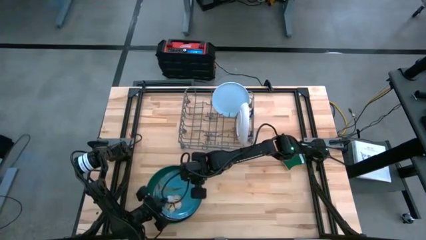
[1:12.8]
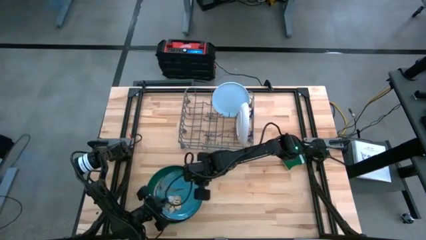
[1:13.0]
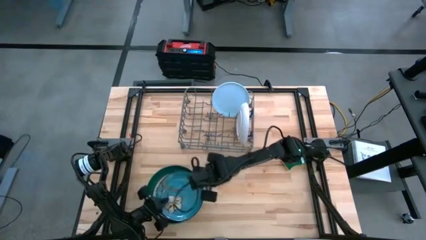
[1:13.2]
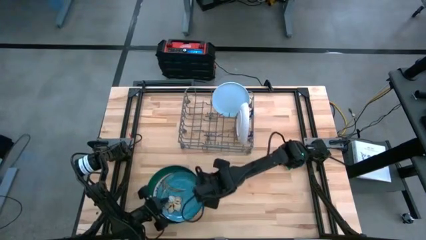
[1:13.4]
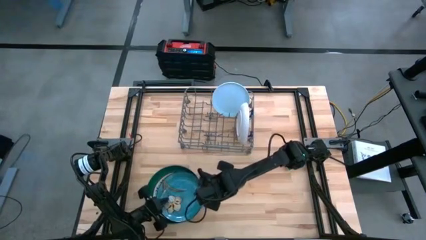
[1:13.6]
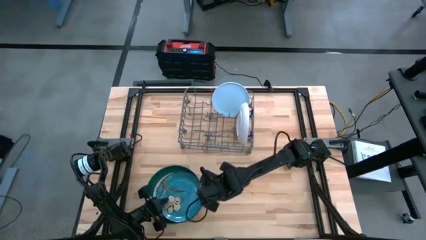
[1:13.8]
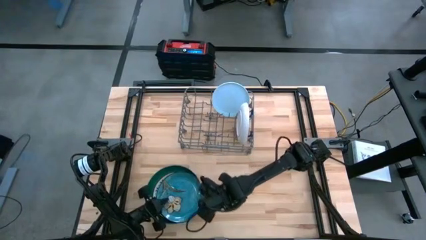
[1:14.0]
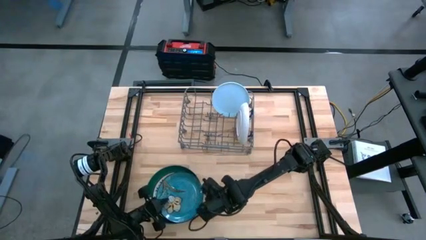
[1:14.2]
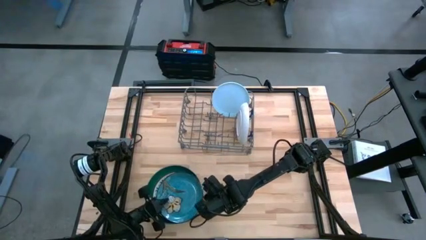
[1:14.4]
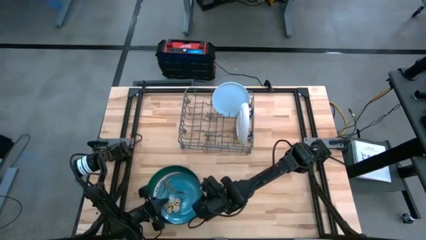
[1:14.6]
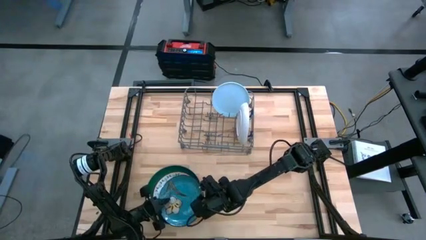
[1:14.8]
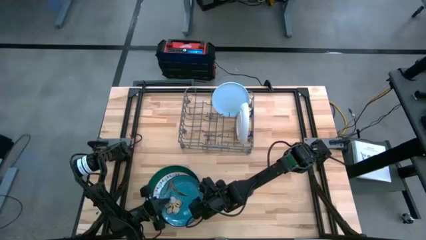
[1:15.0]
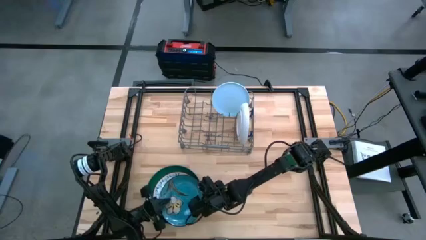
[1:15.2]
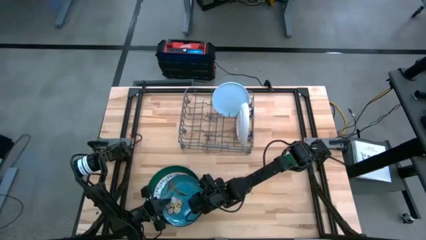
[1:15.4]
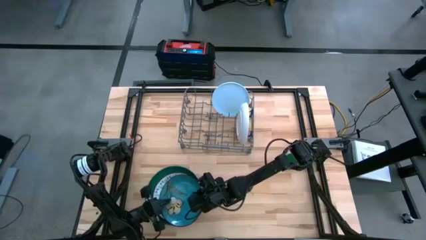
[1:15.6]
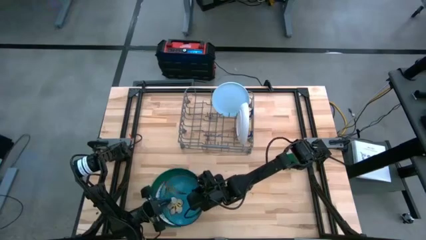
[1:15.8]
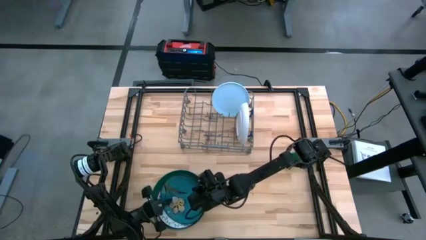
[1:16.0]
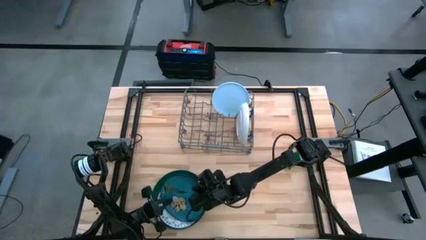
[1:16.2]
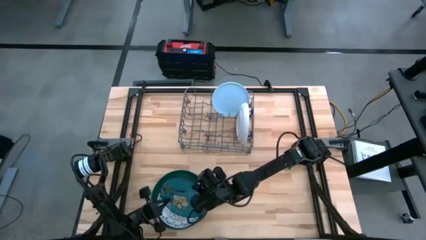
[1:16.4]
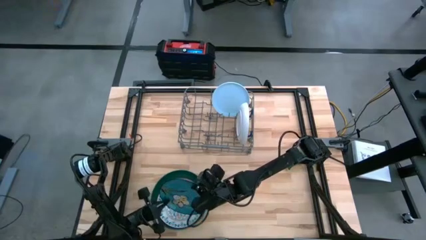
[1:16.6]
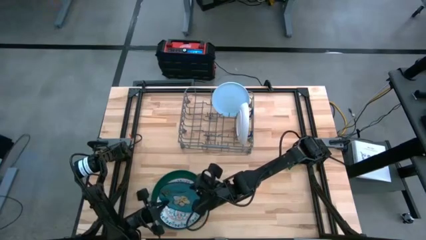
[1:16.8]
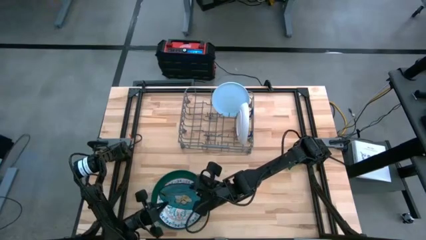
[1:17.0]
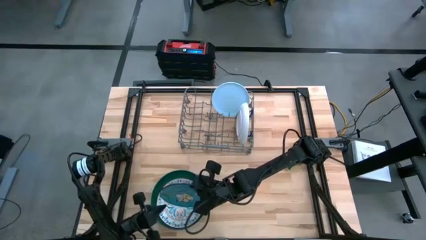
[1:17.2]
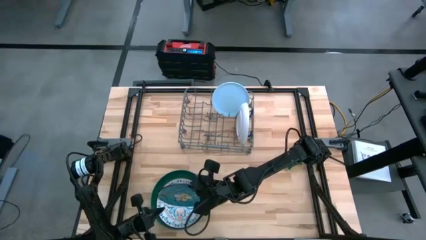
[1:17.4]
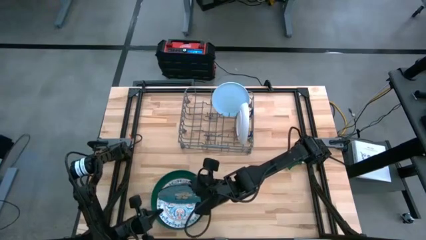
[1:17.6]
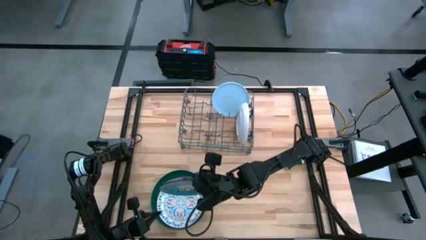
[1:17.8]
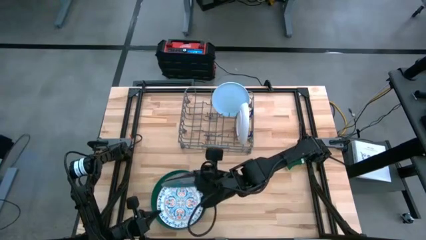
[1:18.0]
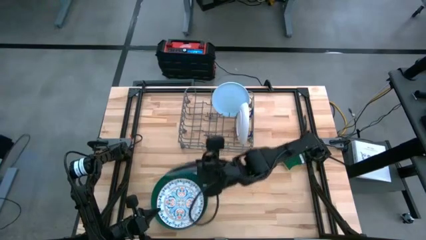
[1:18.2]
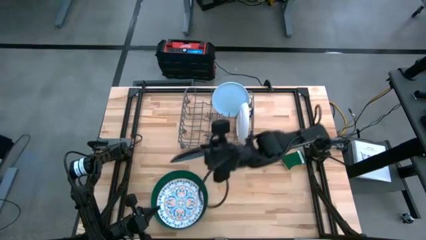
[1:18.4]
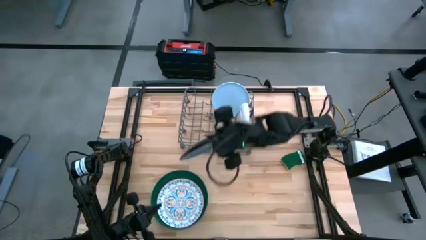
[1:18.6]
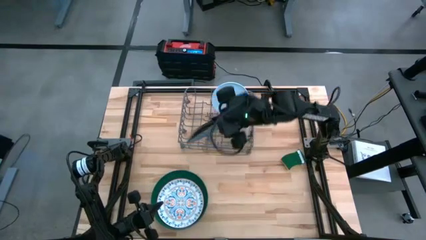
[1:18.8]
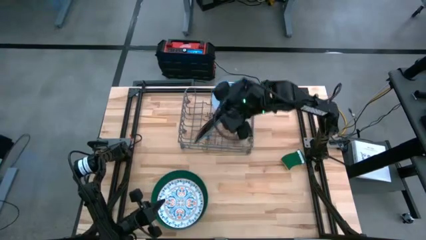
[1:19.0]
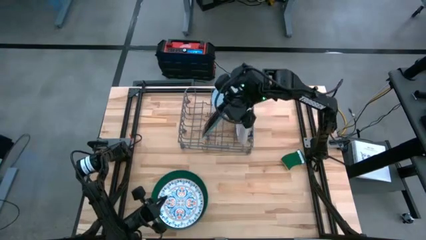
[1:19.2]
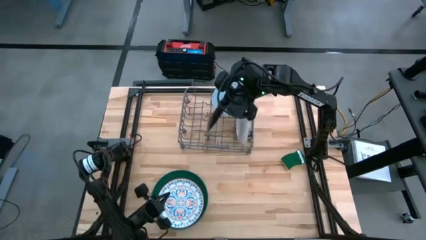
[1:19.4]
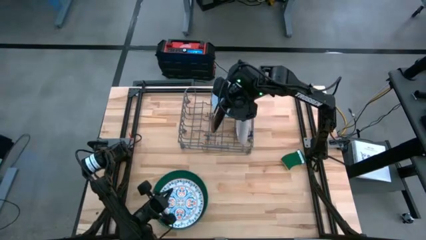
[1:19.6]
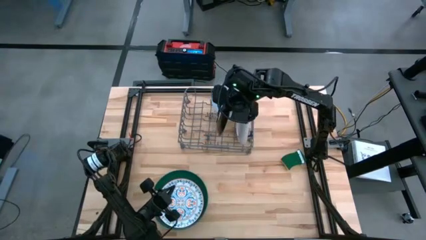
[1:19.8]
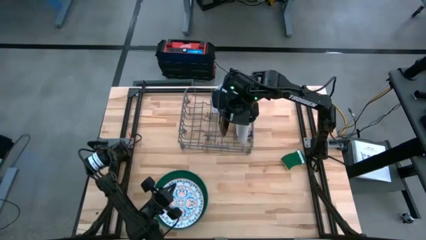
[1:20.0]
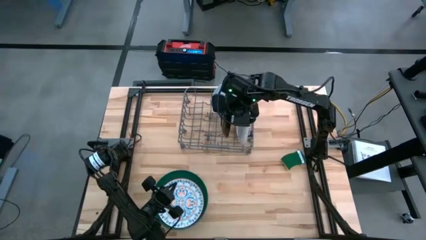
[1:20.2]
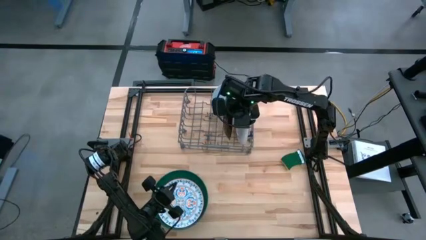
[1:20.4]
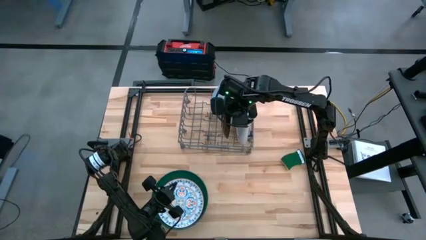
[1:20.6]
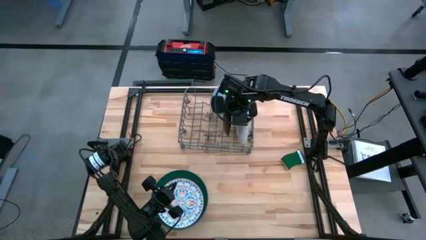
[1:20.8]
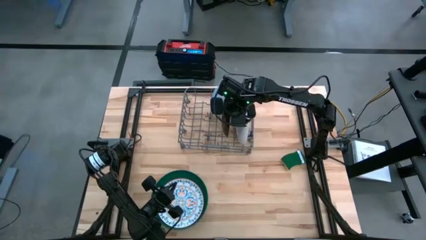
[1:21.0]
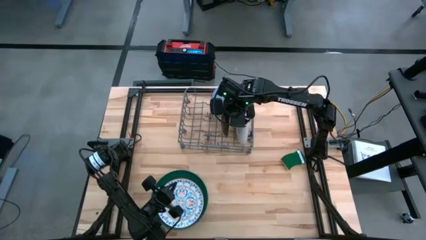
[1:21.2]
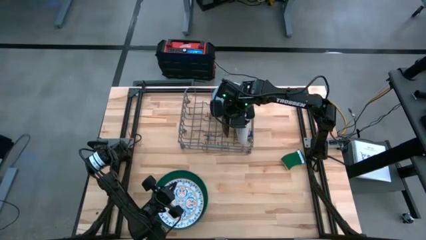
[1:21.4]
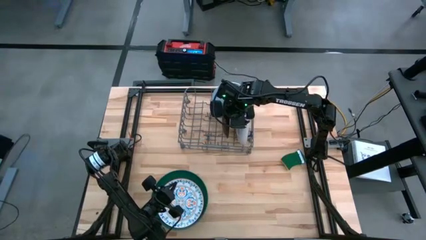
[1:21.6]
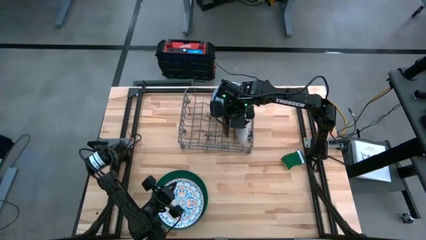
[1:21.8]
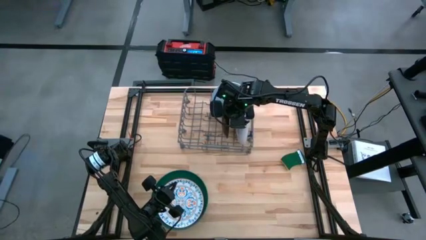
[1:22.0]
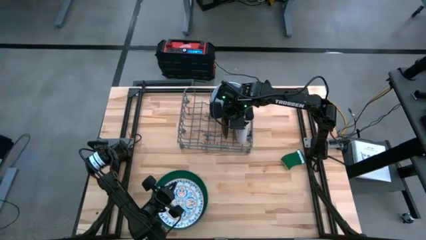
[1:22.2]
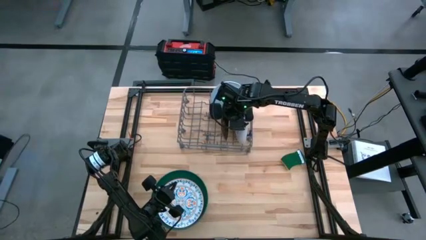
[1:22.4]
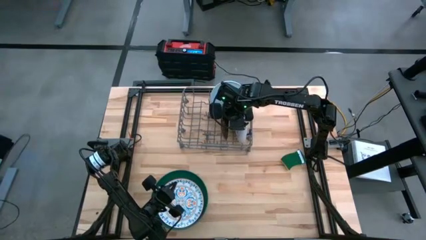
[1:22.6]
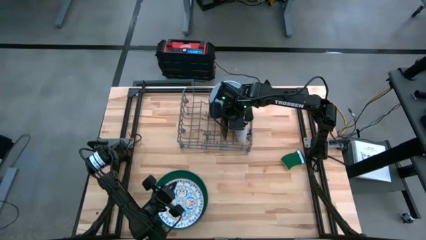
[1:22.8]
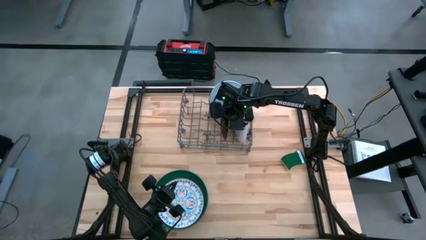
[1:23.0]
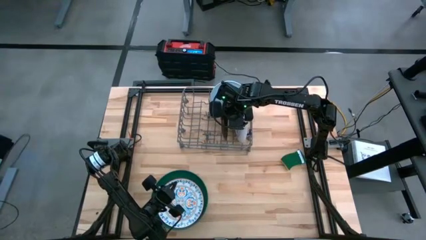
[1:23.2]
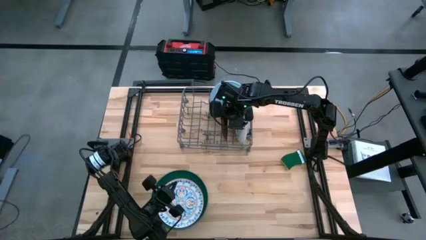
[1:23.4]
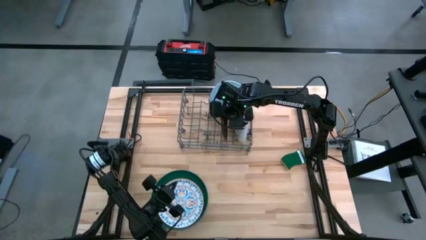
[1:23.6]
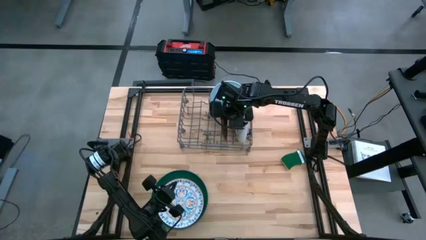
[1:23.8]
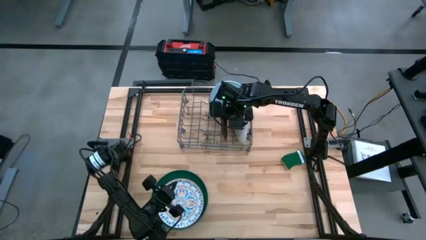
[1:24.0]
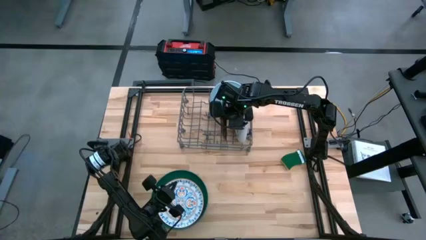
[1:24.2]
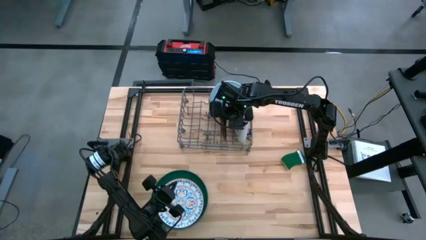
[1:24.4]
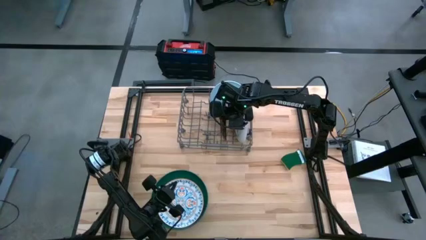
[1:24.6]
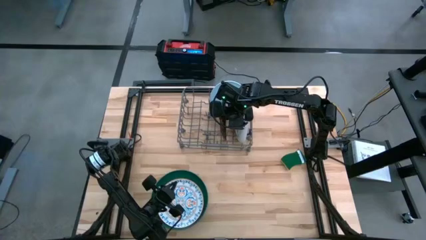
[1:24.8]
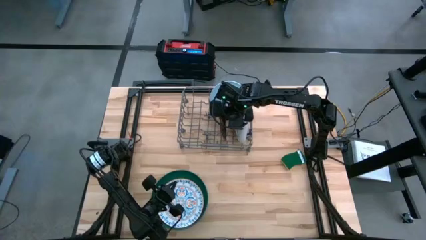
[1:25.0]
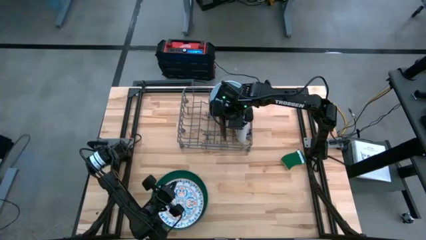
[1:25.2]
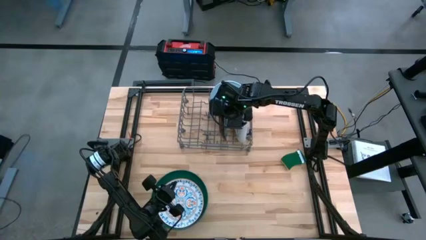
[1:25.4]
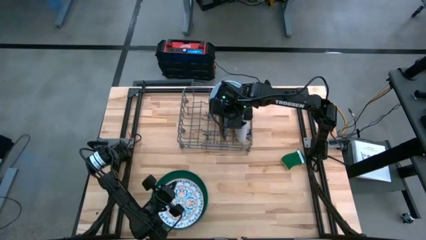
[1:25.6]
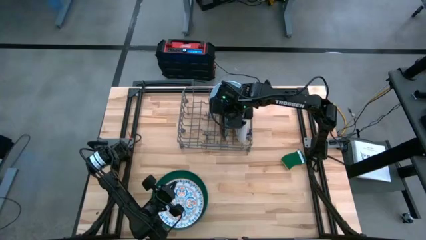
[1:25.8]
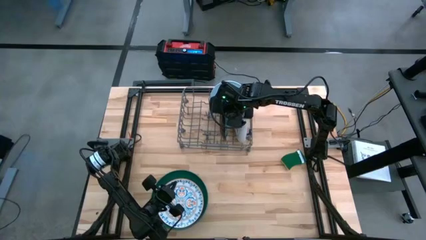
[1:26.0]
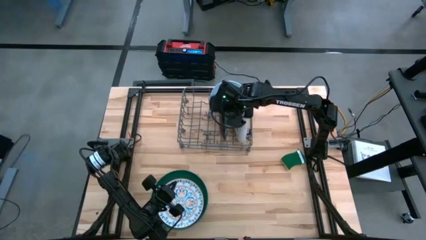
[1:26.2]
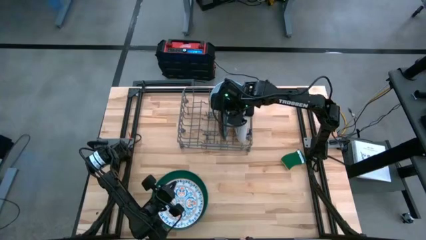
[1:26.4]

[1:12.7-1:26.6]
Task: Sort dishes
Put the blue plate in the dishwasher rack

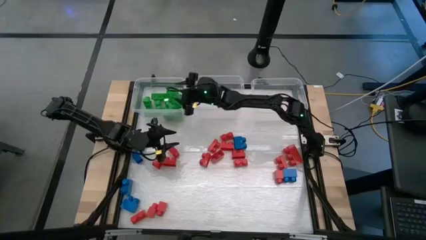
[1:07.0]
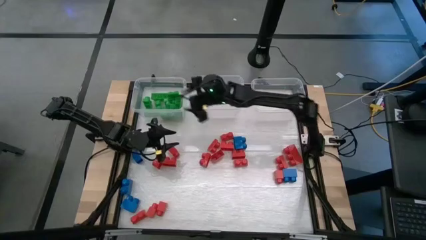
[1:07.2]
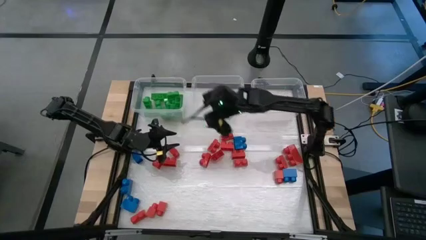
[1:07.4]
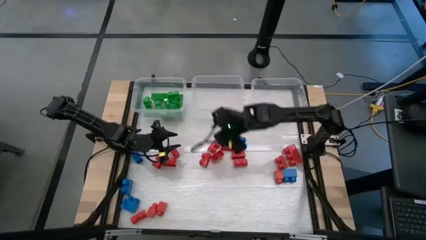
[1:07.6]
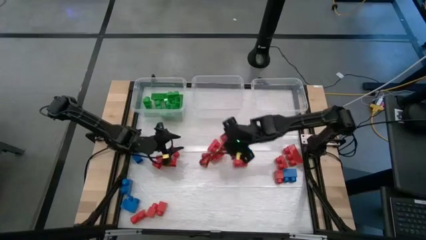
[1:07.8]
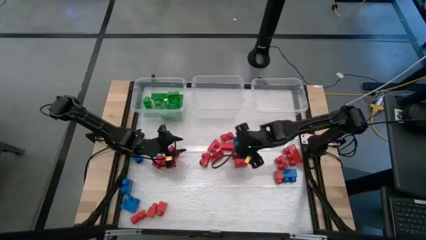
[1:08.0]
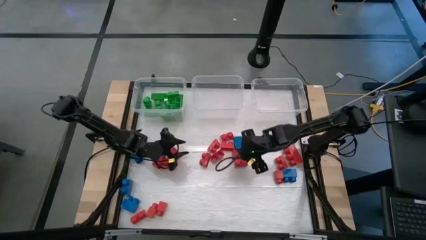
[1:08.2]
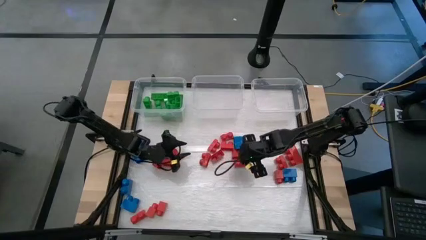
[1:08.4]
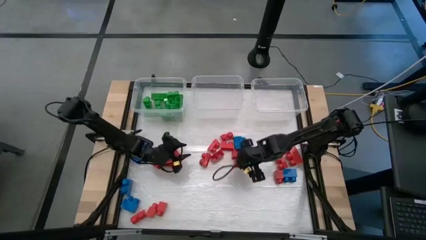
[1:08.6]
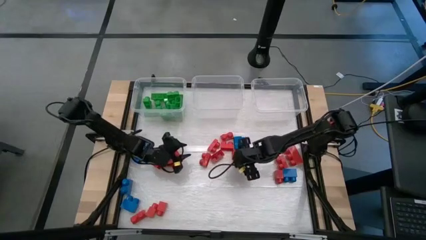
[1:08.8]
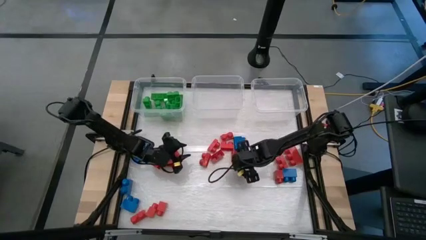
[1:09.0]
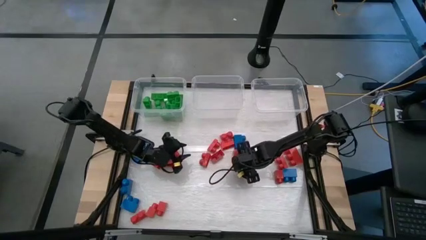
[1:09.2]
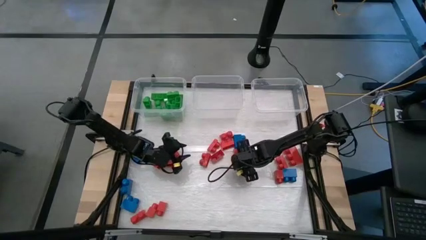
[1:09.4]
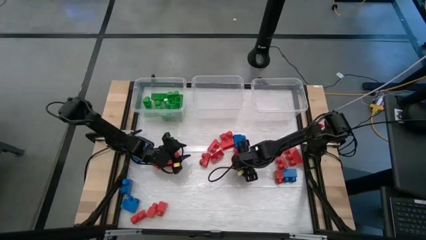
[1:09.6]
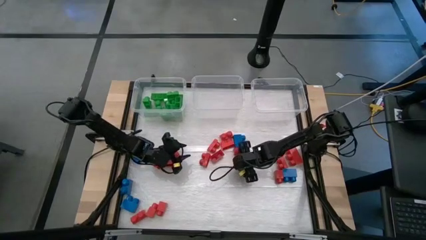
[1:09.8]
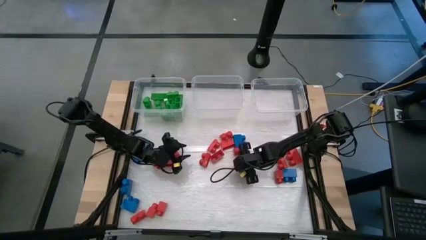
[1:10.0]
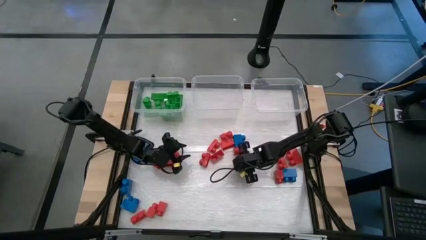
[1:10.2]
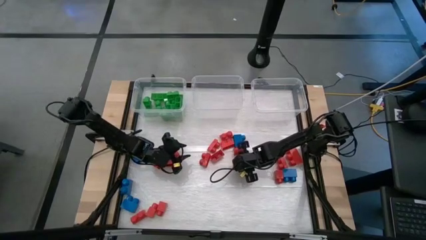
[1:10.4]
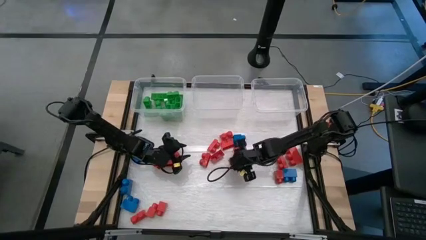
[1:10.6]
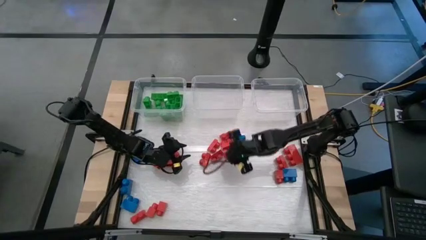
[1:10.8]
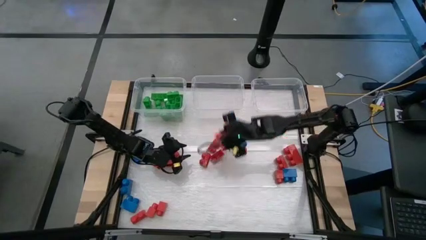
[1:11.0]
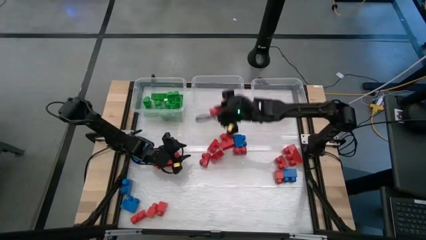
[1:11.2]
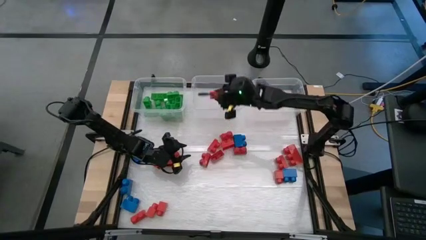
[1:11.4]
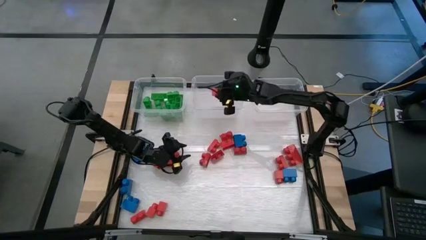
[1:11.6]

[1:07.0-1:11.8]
Task: Sort blocks
Put the red game piece into the middle transparent bin
